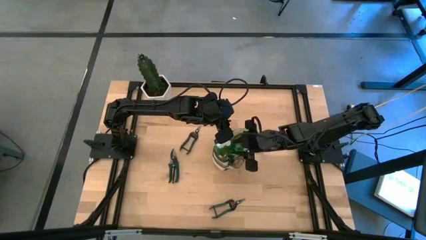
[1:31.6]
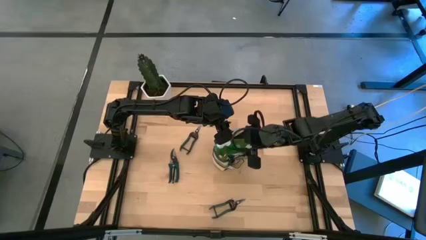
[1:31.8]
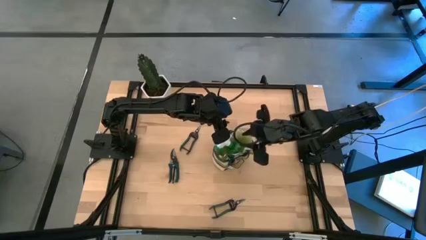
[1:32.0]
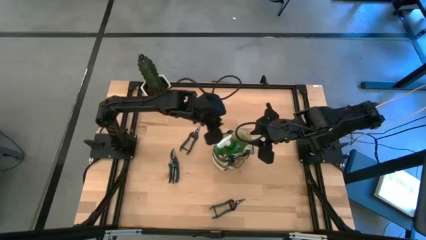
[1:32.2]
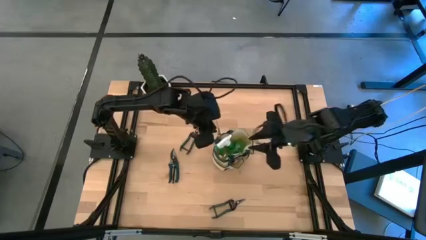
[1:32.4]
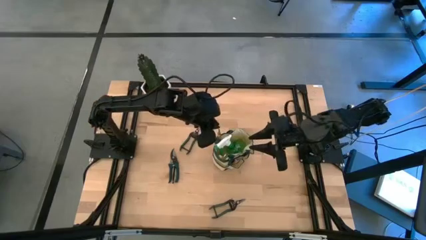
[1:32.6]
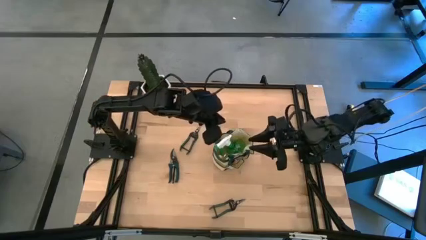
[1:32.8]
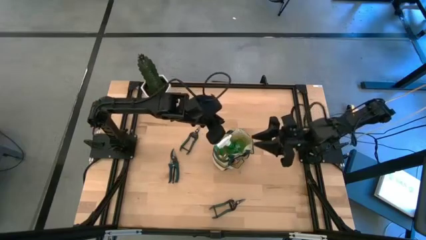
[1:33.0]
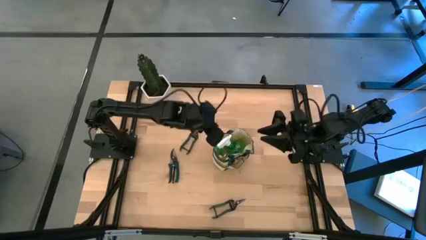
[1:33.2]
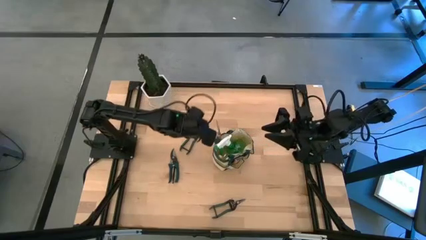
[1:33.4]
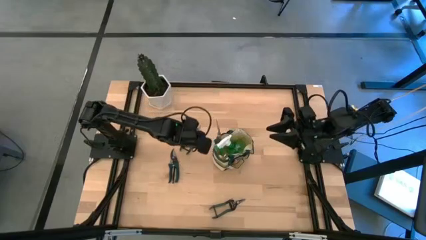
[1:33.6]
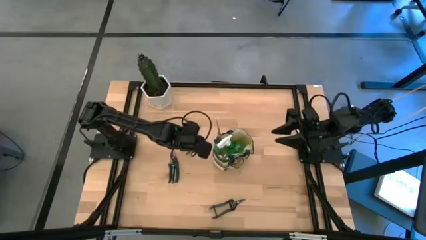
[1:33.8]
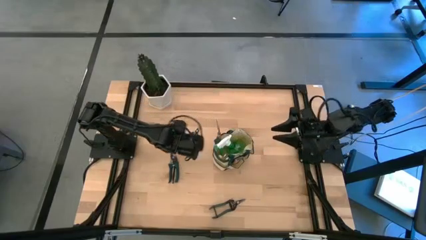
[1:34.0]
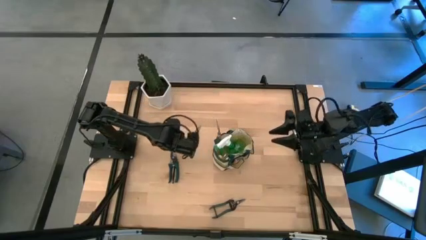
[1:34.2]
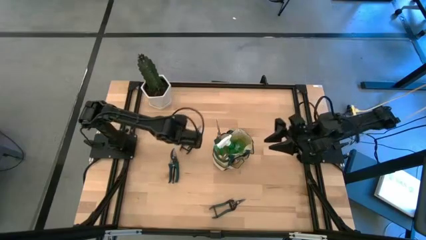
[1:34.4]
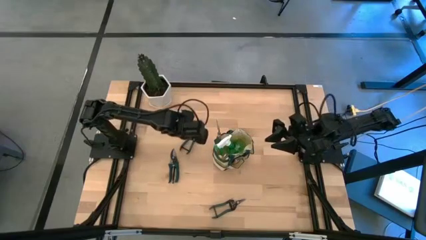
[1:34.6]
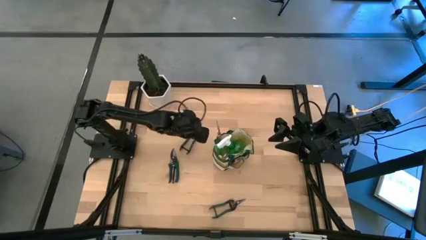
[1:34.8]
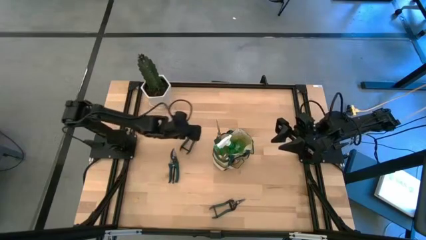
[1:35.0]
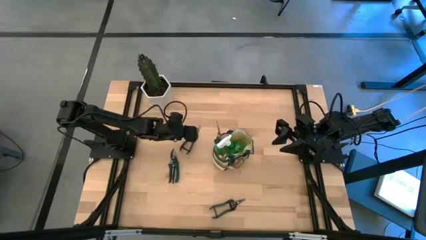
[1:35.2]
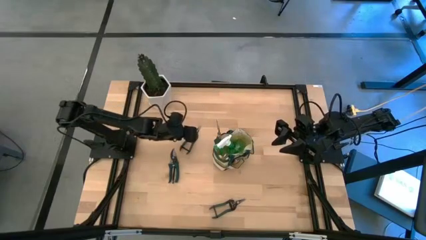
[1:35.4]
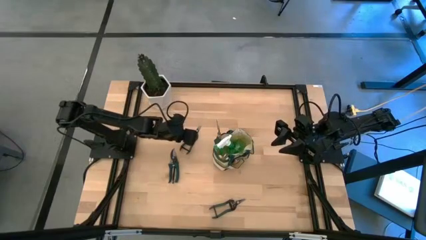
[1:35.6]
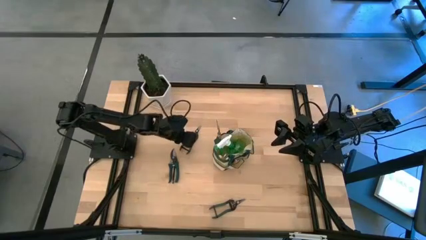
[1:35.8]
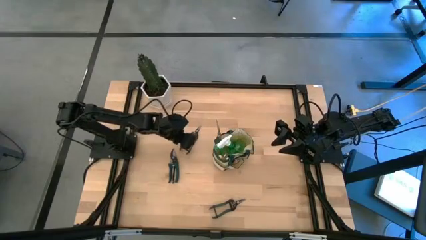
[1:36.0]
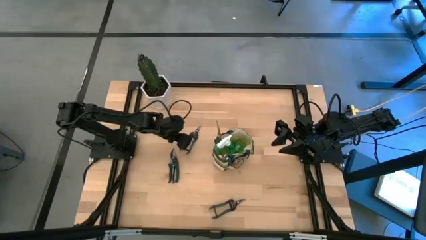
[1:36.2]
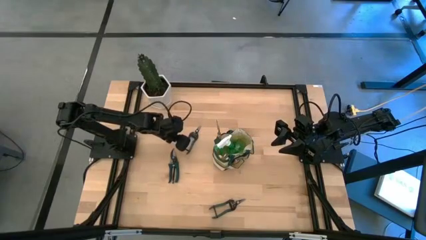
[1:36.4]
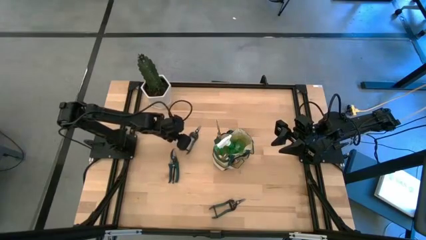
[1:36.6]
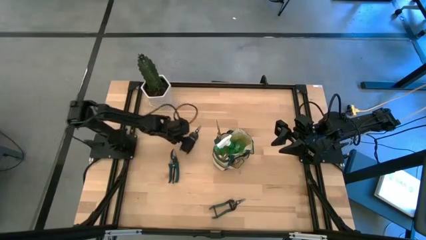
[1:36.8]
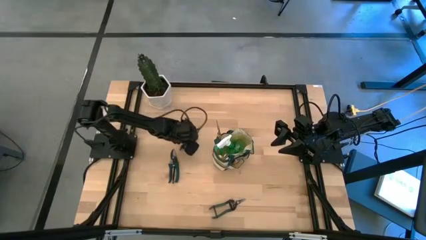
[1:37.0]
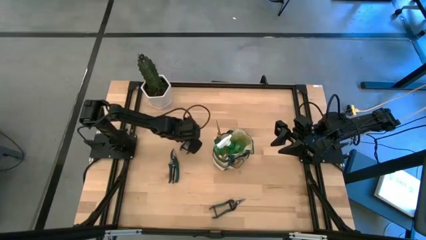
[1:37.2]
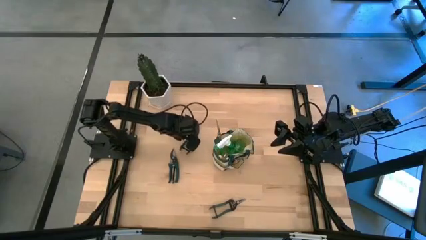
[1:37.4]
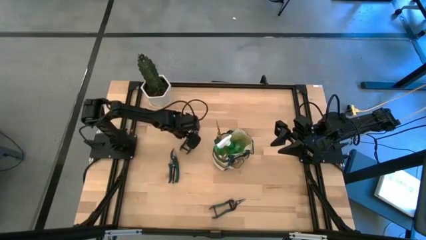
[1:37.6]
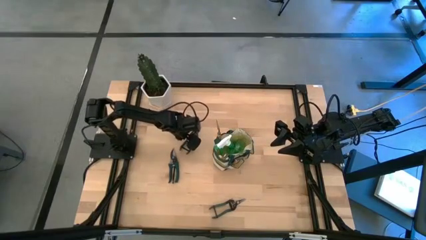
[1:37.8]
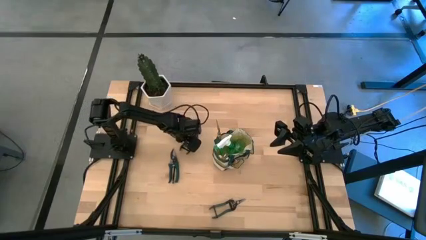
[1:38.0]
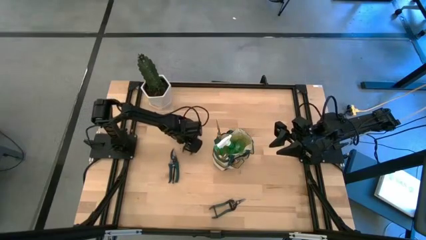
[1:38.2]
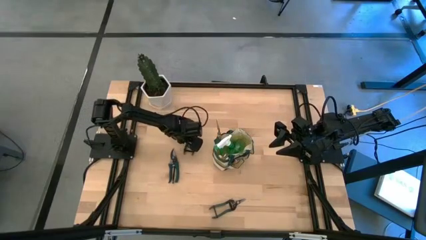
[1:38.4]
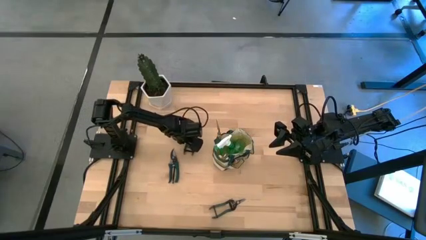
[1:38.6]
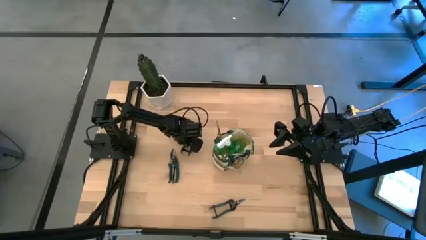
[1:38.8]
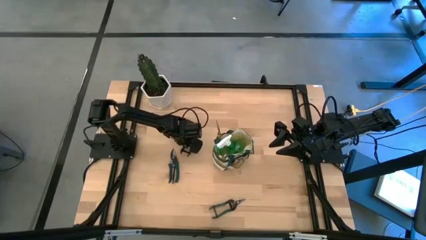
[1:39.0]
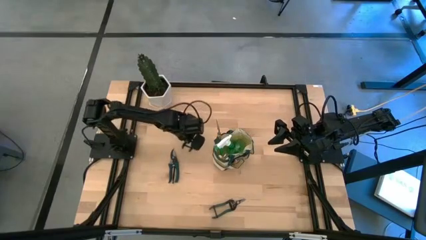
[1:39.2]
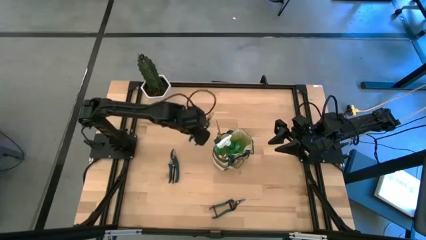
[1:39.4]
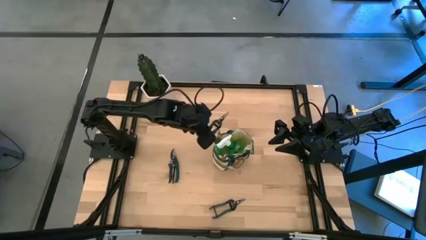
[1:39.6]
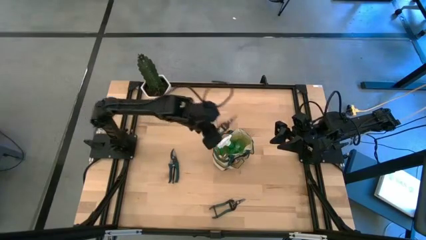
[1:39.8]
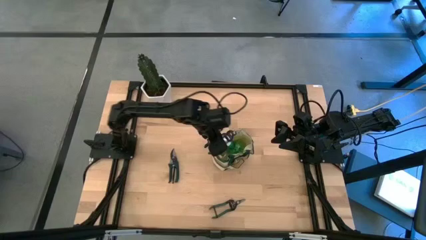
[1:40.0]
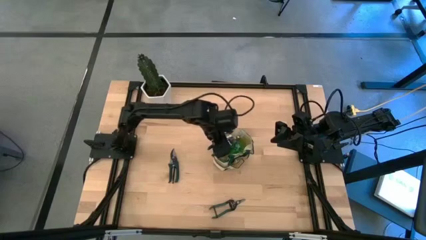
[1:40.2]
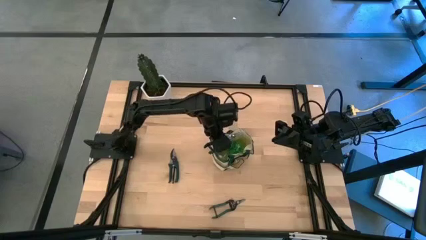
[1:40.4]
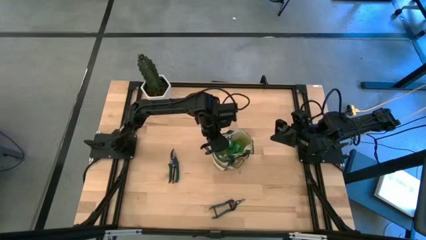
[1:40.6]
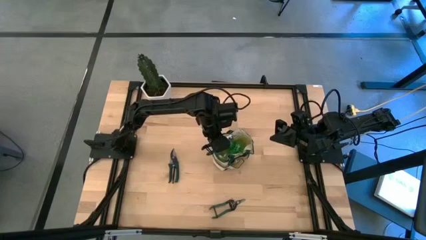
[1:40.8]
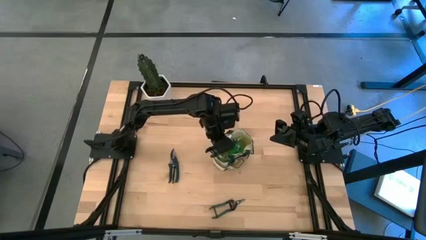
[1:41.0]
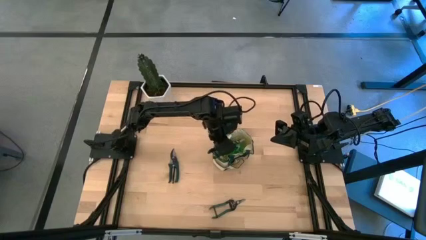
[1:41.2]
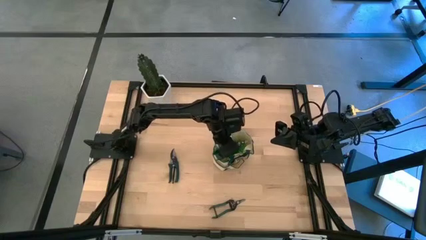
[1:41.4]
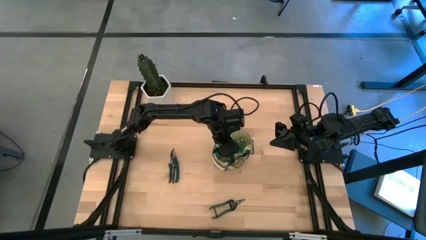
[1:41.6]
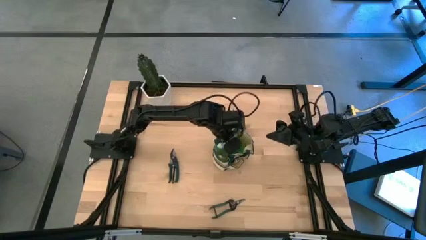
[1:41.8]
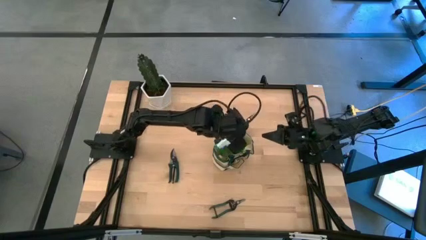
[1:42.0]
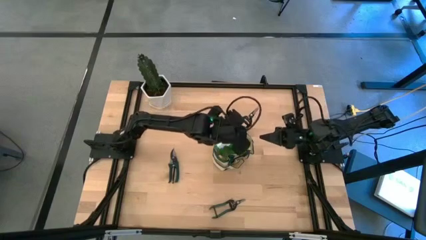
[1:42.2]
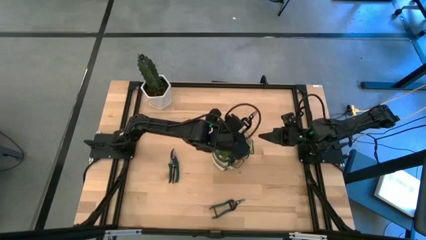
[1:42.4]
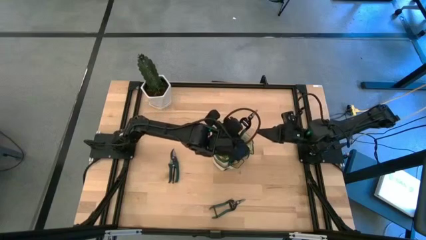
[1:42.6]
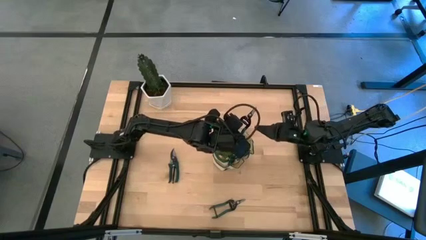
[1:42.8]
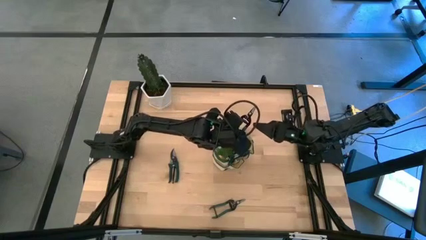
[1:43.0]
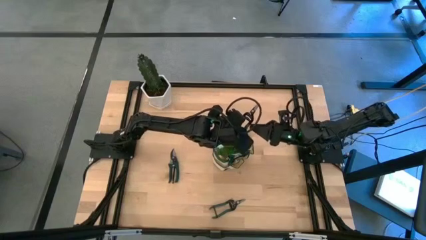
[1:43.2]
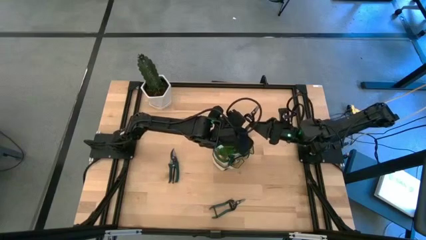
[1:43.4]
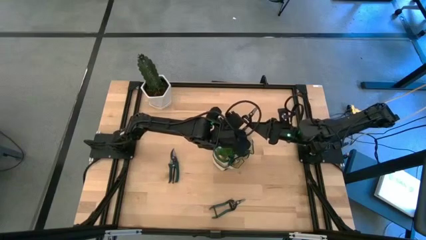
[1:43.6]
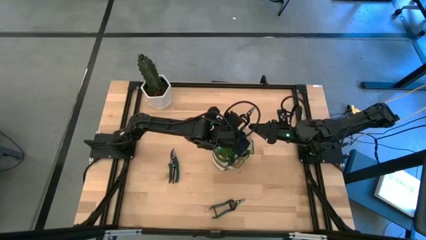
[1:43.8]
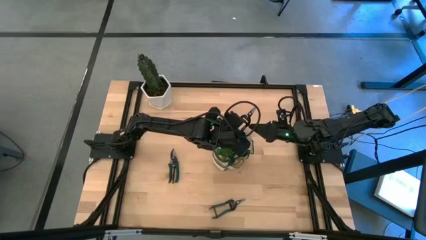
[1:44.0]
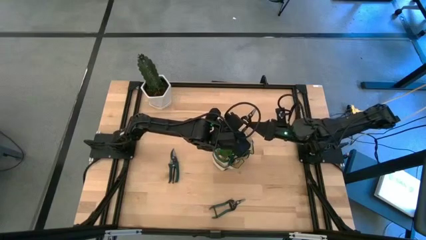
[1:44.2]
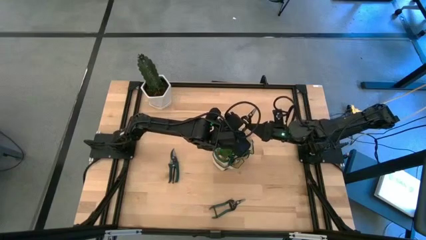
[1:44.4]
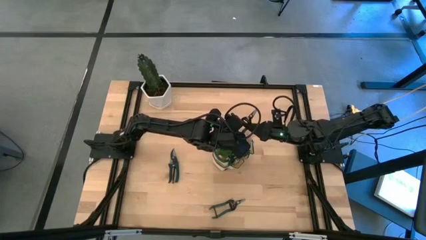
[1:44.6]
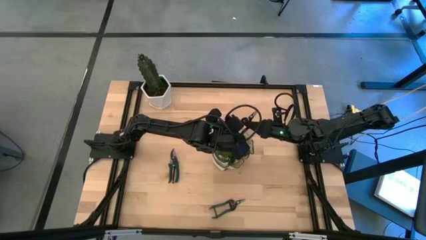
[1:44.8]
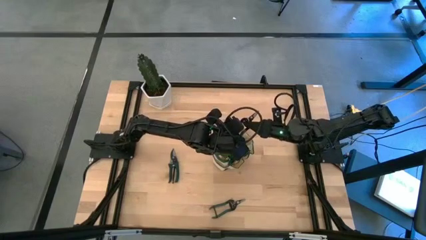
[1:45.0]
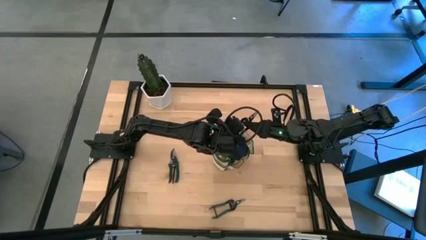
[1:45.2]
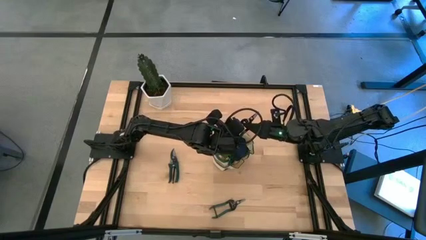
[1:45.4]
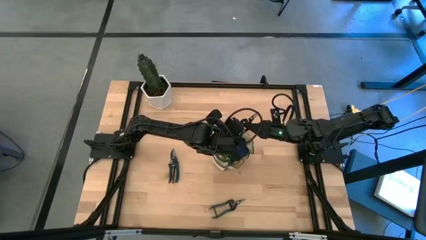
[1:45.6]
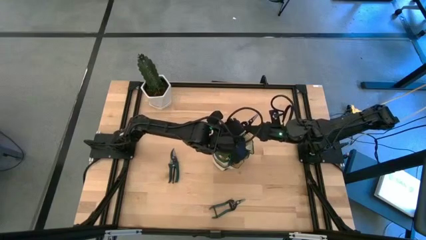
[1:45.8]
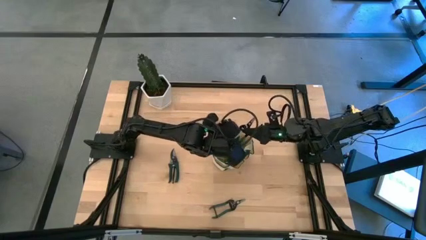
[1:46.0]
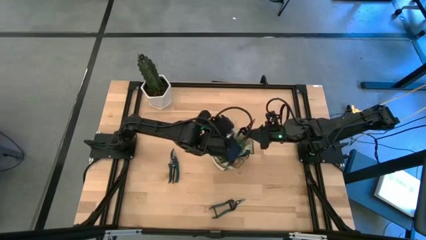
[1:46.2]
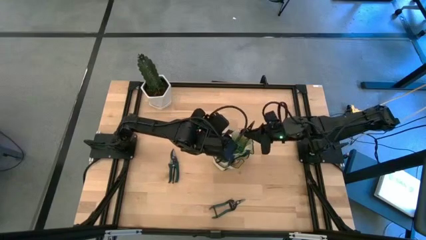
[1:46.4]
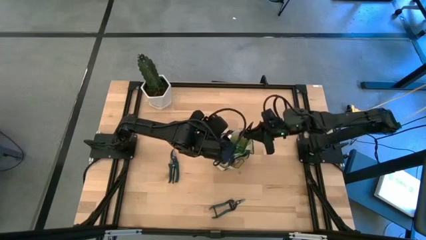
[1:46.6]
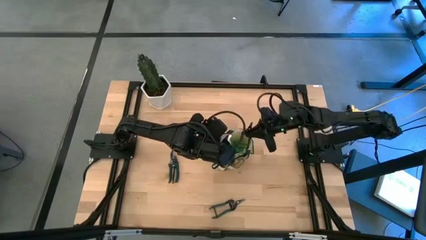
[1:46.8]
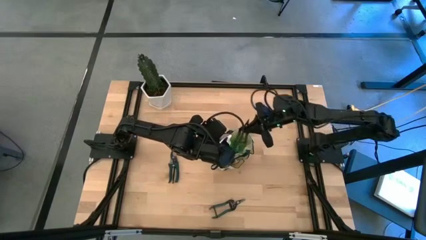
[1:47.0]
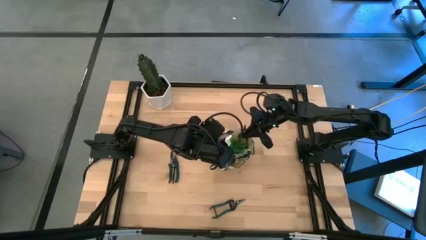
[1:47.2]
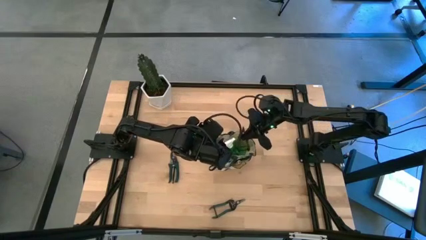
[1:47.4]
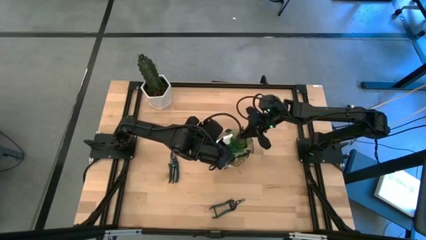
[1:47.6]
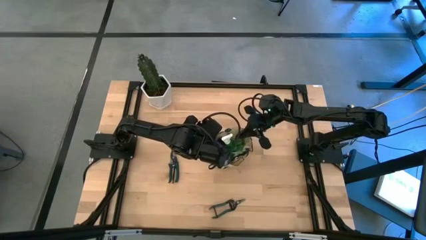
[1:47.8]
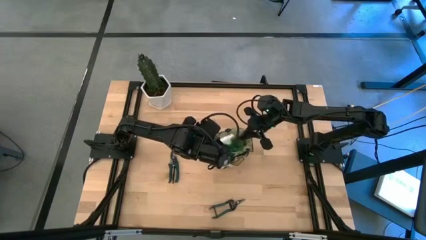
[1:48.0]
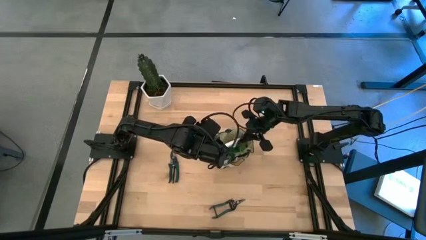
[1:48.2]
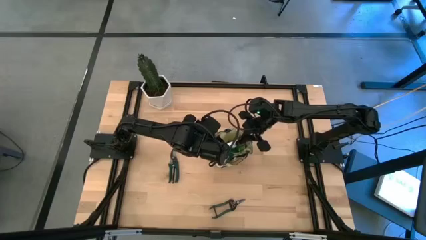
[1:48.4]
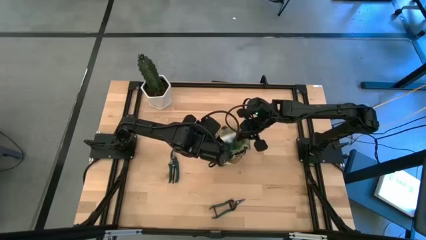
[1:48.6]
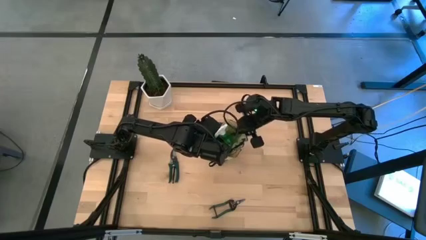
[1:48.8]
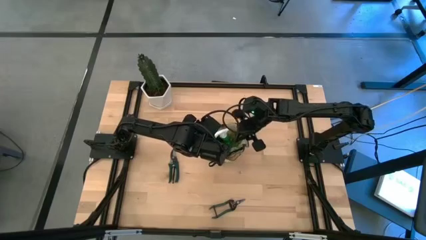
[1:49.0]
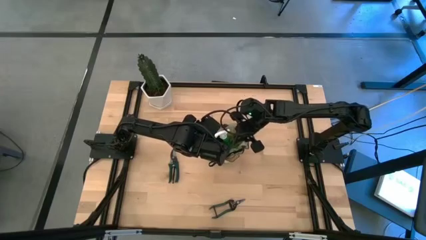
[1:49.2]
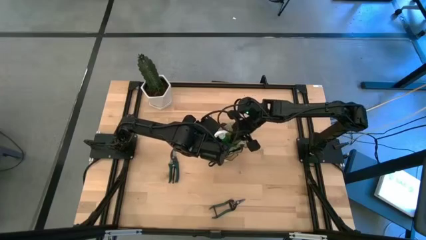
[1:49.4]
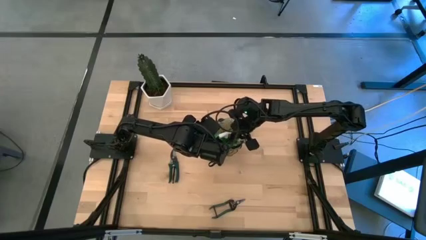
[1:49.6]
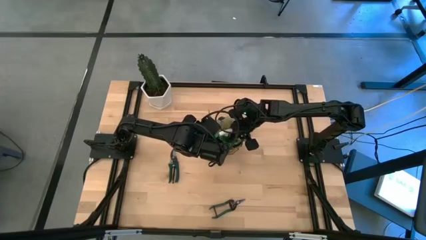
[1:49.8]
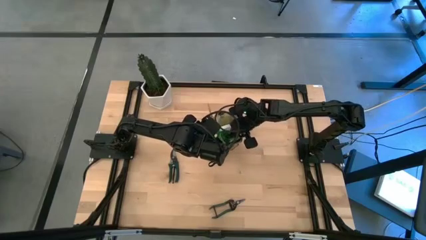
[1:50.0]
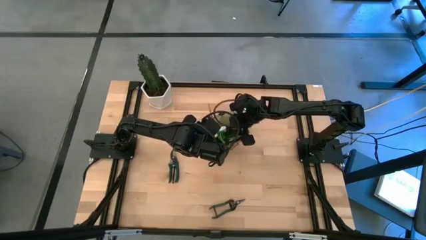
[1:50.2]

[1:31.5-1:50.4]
Task: Pick & Place Garden tools in Gardening bag
Put the top shear scissor into the gardening bag
